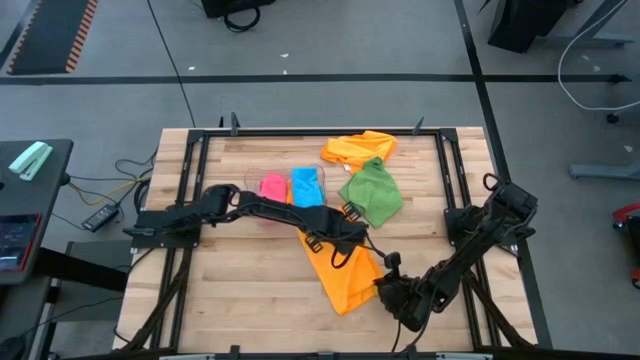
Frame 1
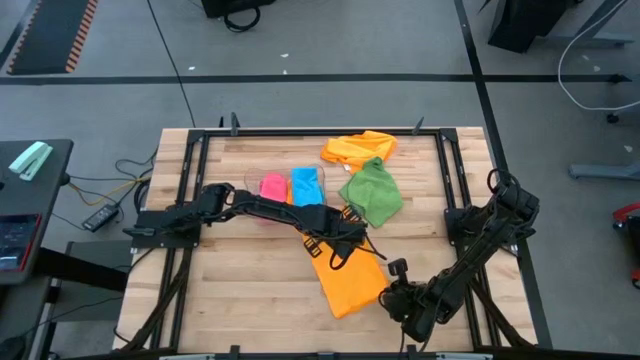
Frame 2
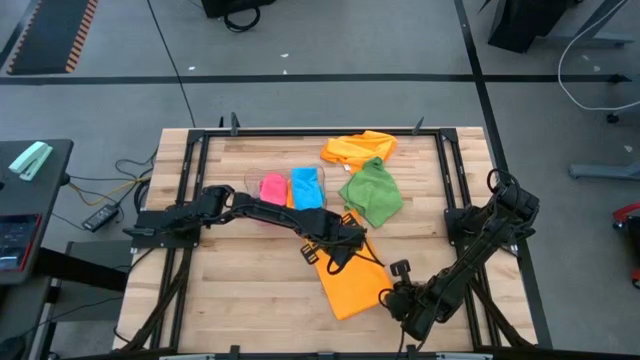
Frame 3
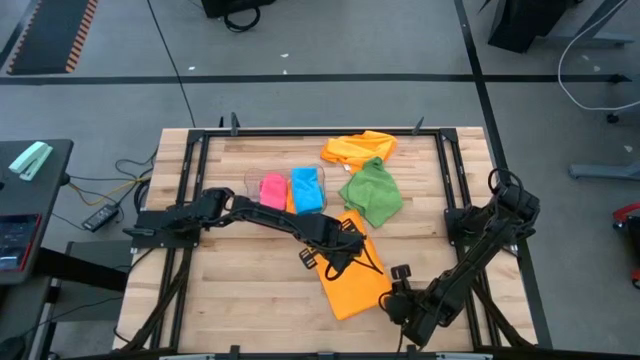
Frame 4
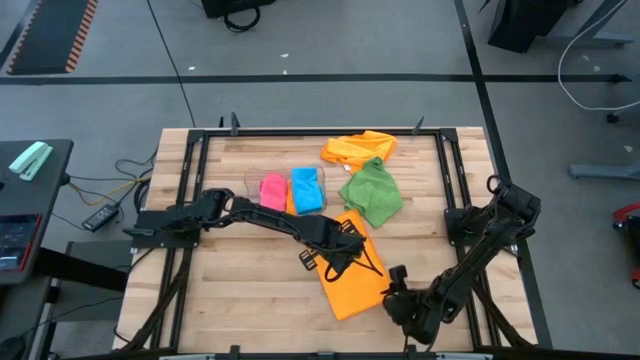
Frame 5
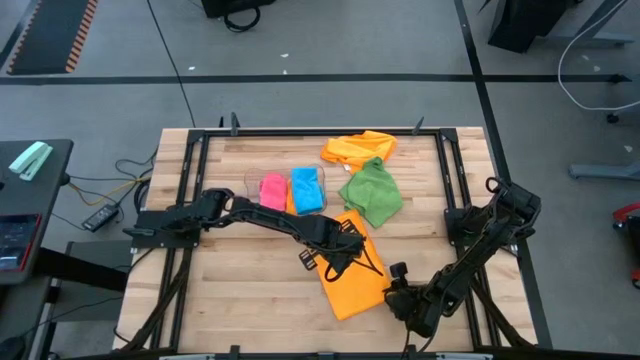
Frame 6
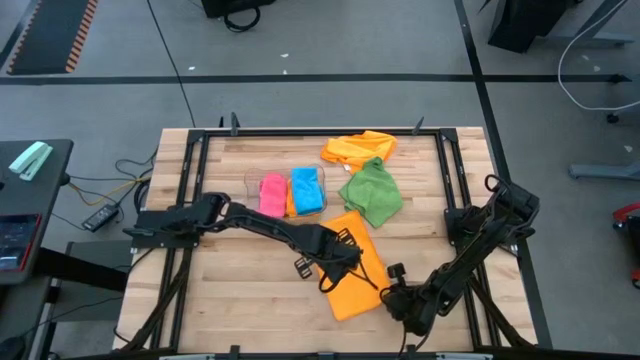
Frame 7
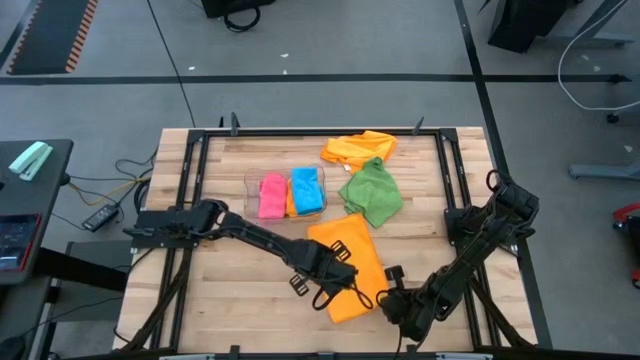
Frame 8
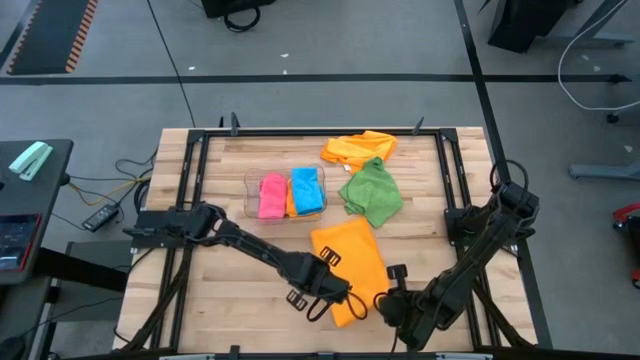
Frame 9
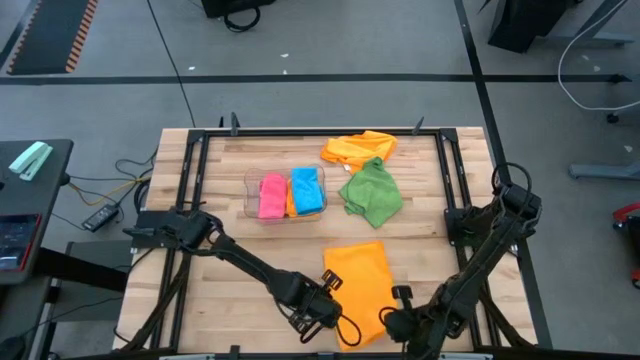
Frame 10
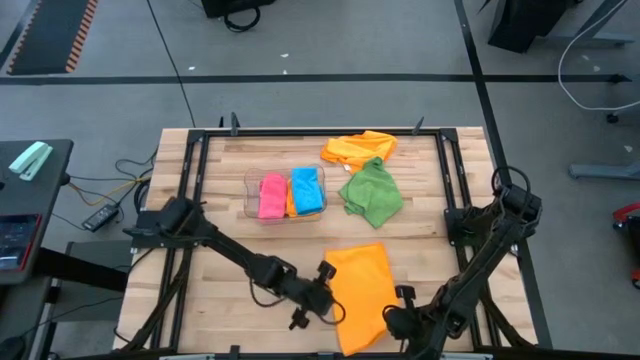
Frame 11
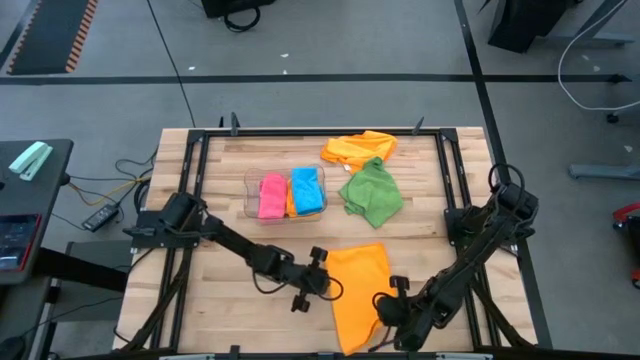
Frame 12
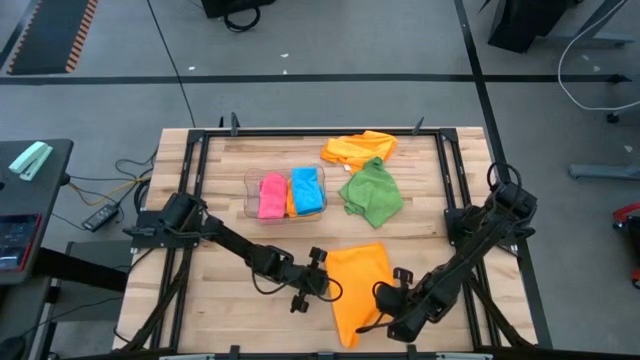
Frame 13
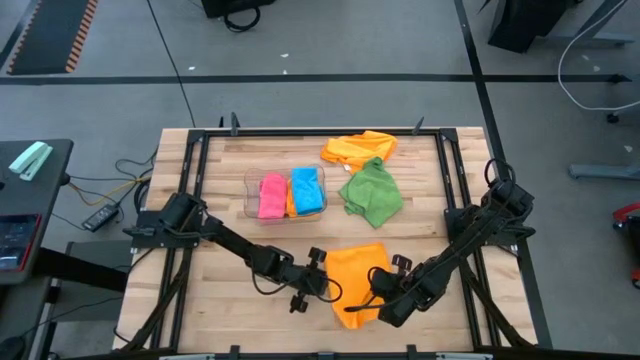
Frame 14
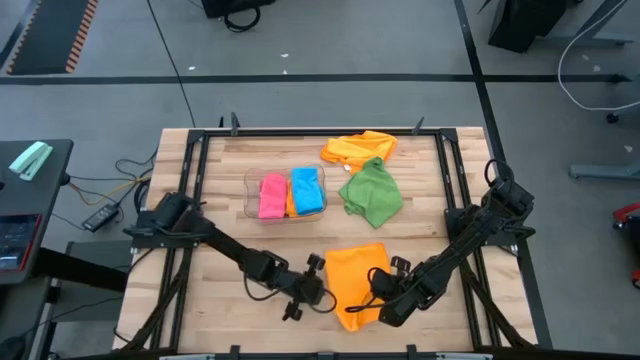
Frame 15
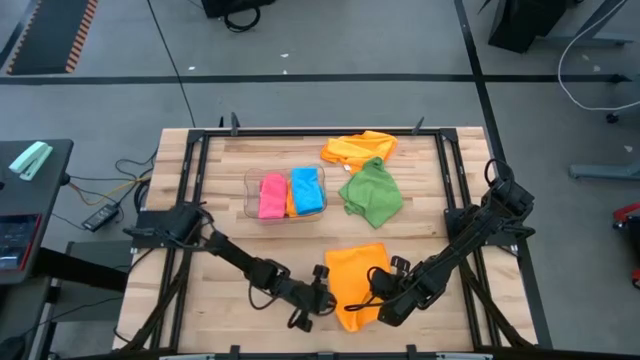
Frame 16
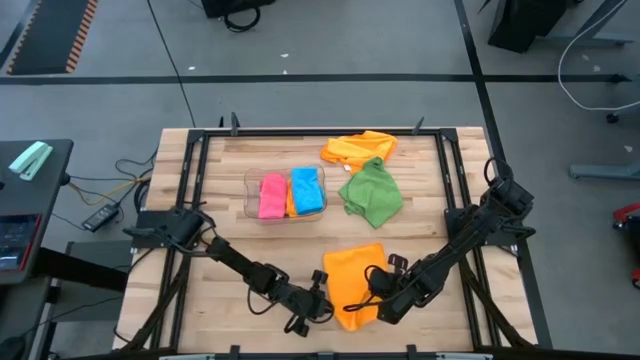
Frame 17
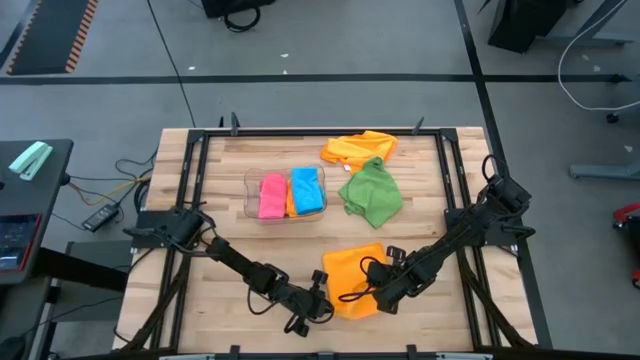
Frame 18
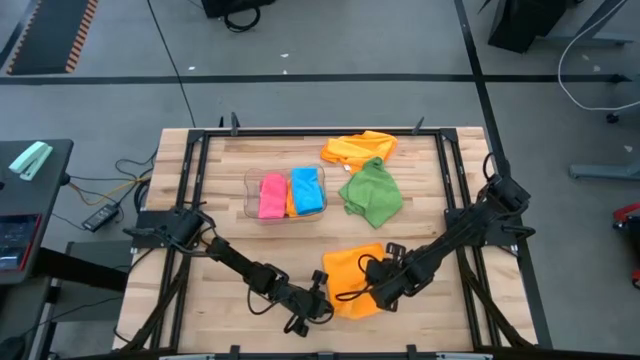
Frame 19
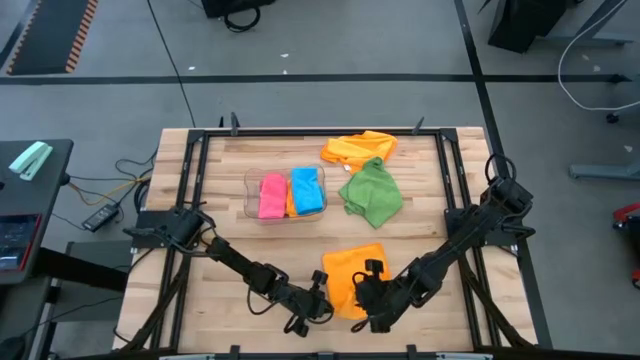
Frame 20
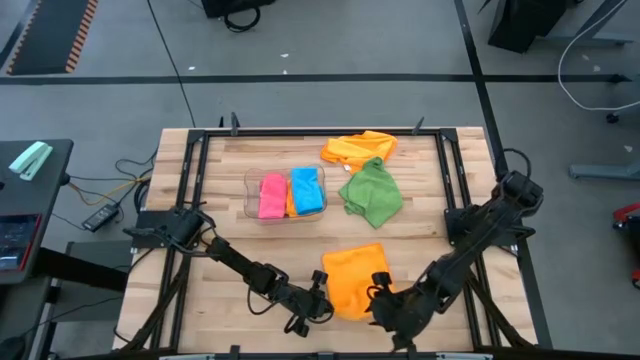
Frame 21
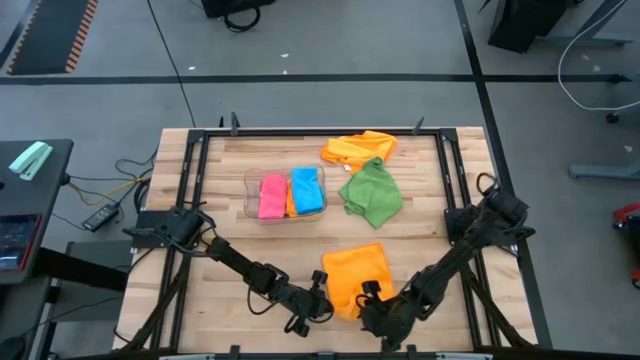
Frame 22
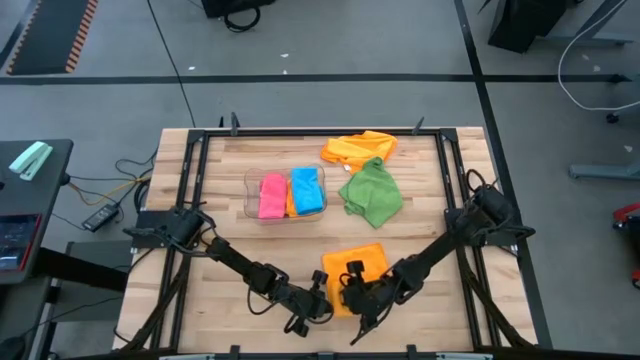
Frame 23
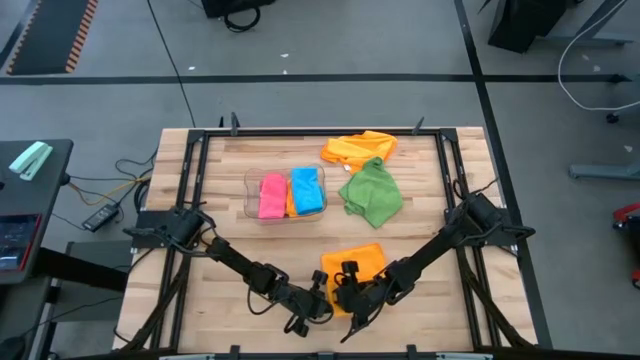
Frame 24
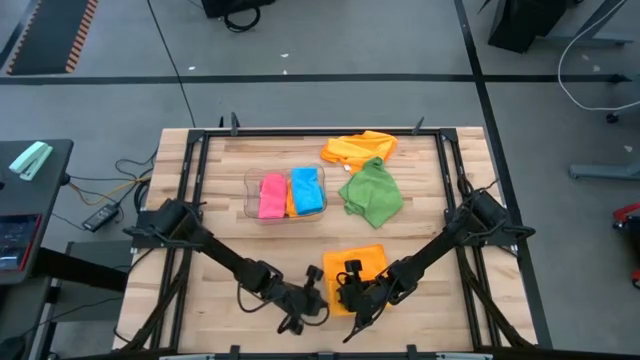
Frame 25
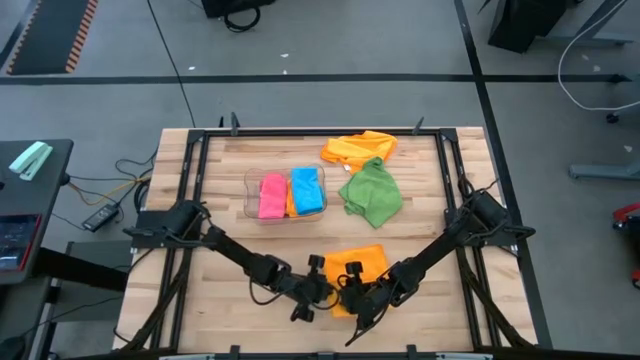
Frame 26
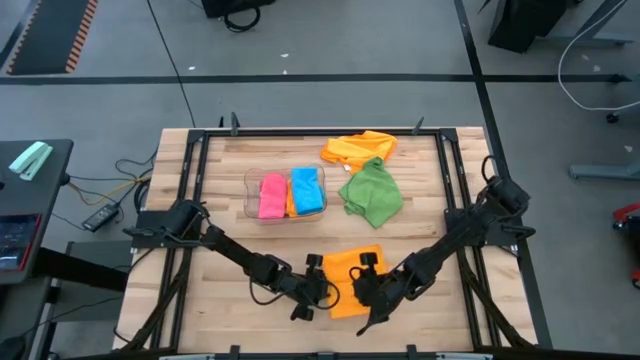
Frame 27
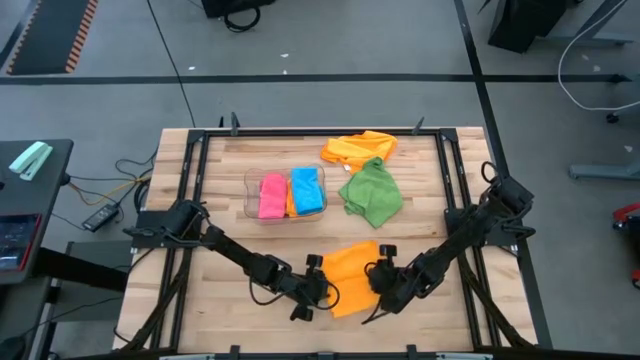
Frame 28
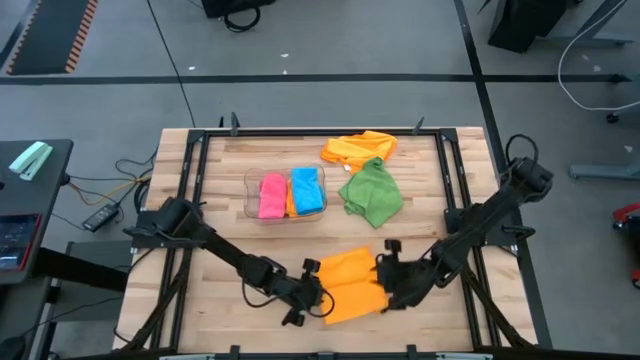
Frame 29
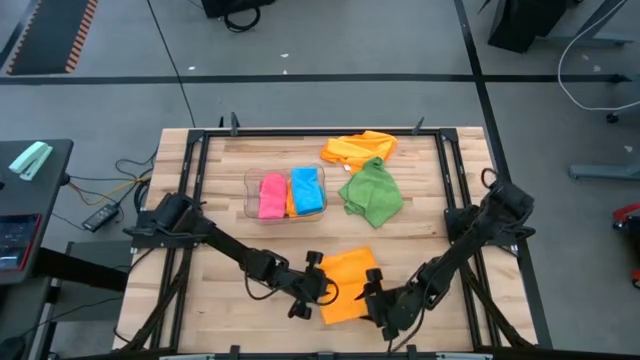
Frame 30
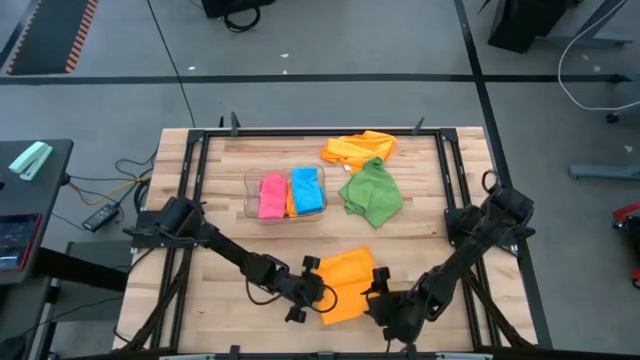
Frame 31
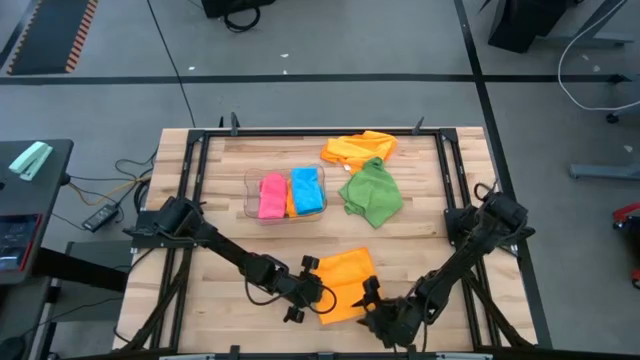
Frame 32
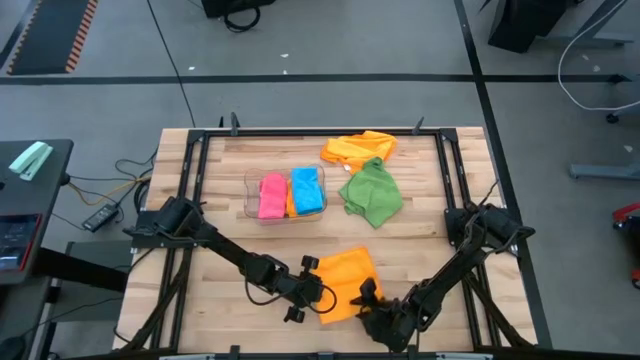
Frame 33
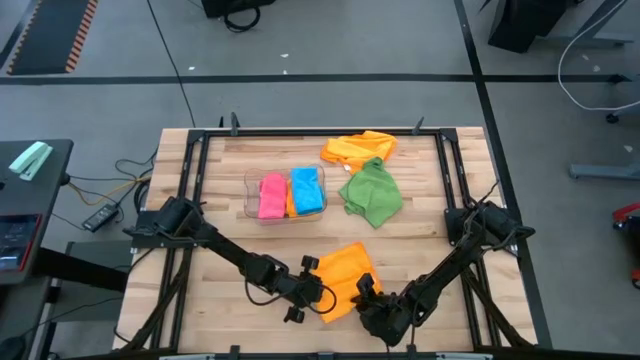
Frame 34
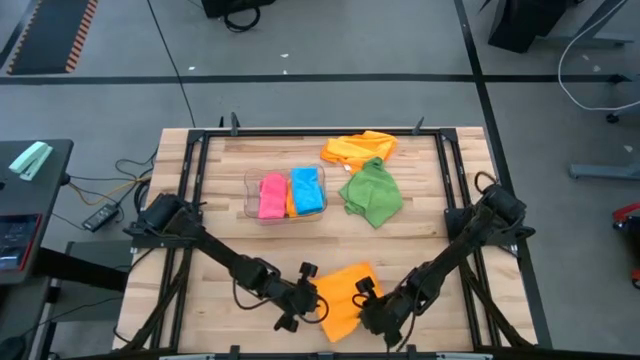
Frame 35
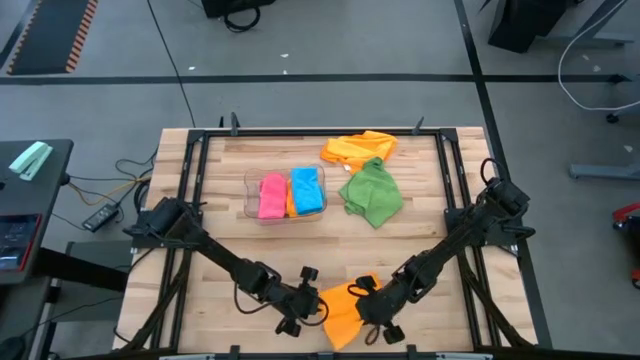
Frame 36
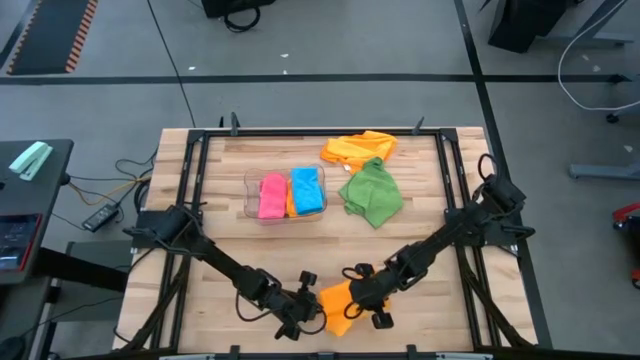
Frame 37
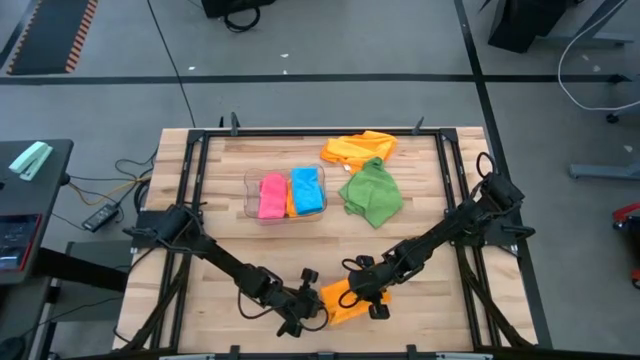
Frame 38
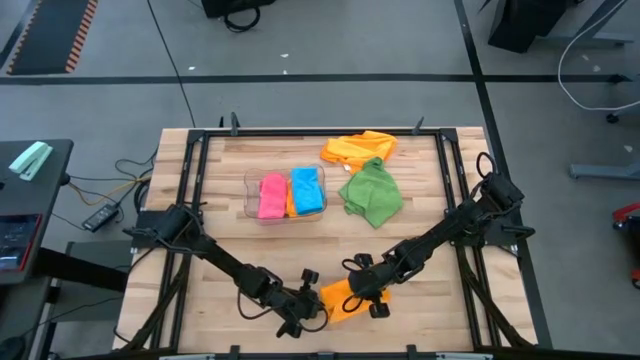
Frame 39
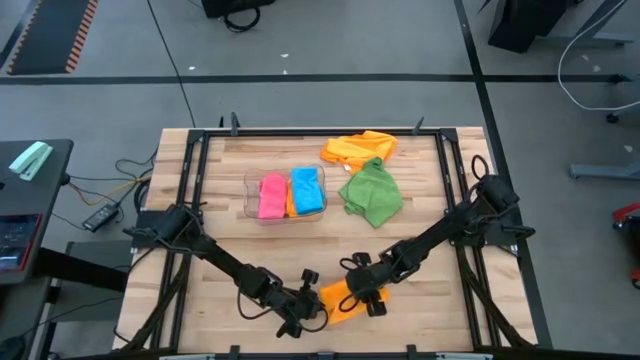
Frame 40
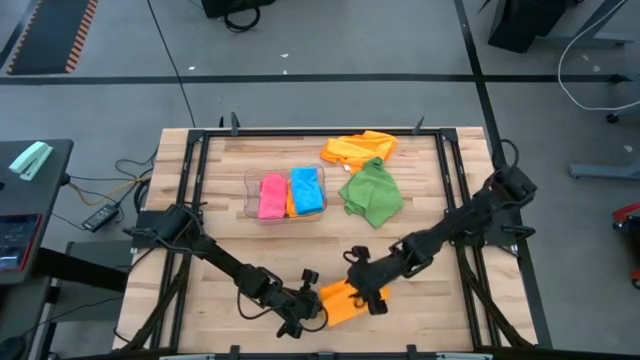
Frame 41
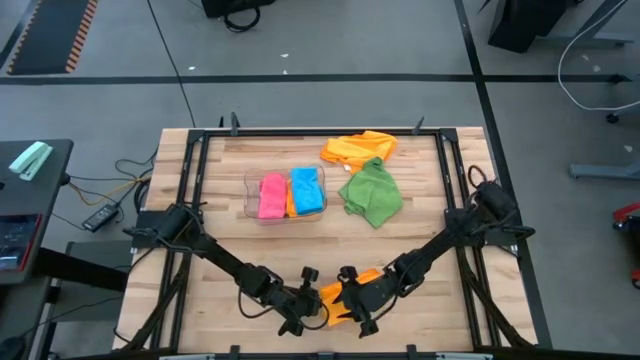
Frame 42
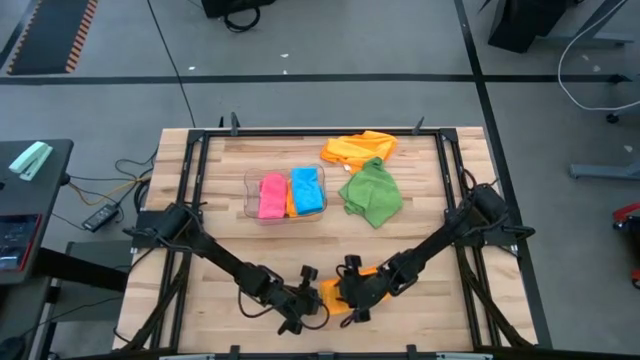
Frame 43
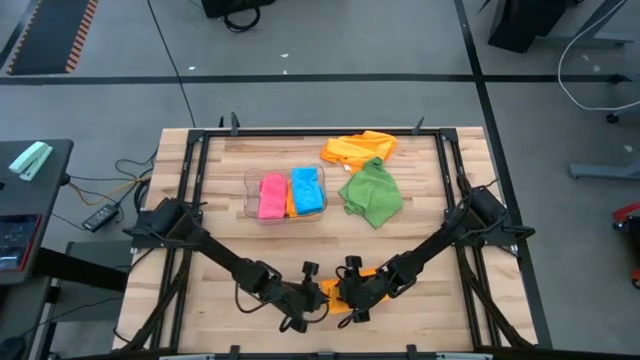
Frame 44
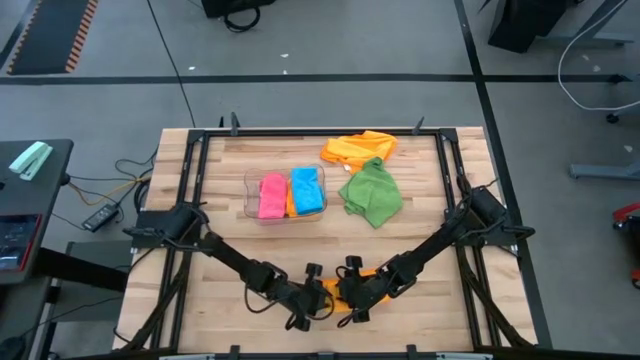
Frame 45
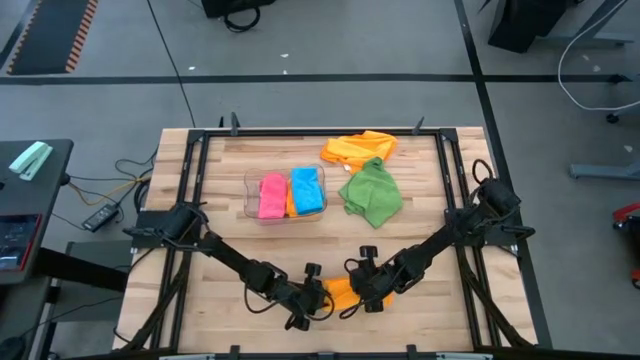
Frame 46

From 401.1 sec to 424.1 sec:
Task: Fold microfiber towels
Fold the bottom orange microfiber cloth
